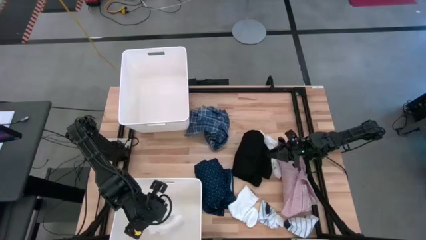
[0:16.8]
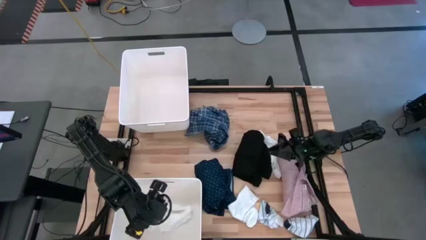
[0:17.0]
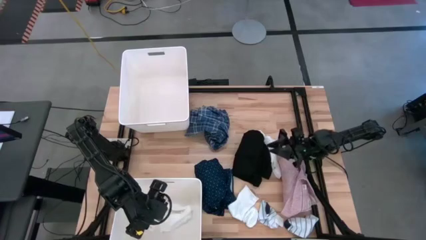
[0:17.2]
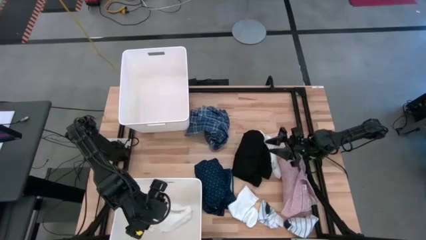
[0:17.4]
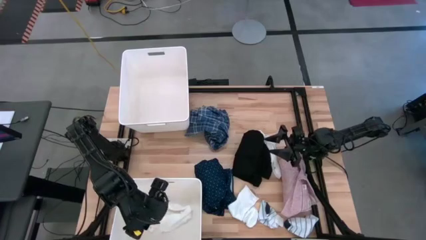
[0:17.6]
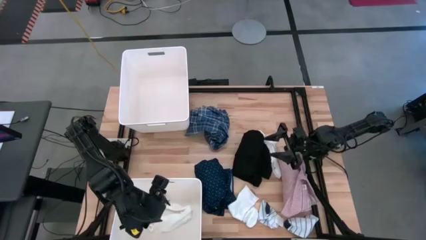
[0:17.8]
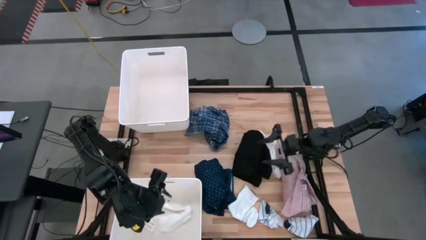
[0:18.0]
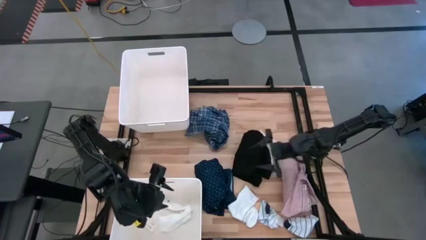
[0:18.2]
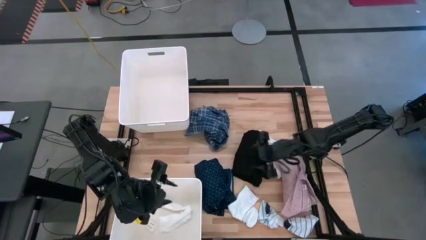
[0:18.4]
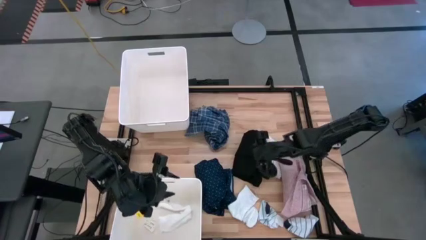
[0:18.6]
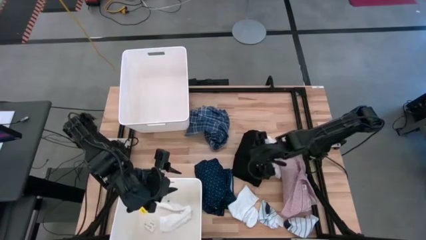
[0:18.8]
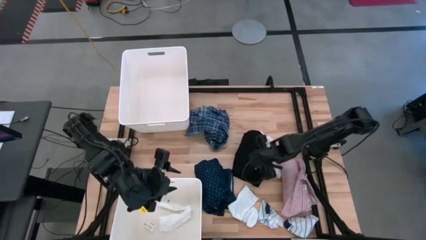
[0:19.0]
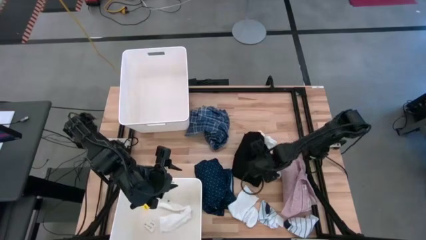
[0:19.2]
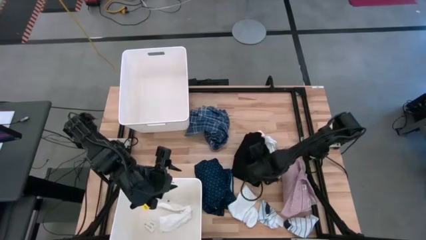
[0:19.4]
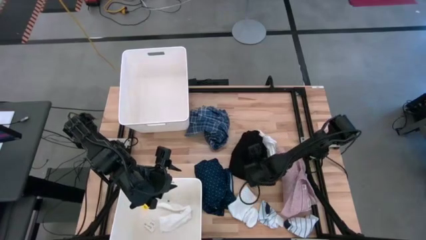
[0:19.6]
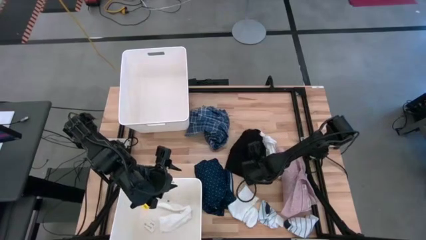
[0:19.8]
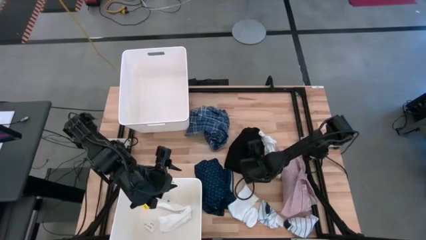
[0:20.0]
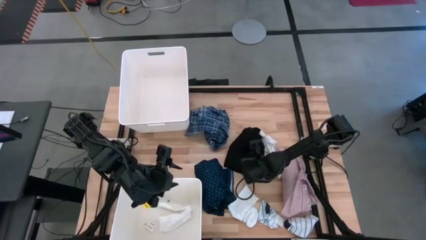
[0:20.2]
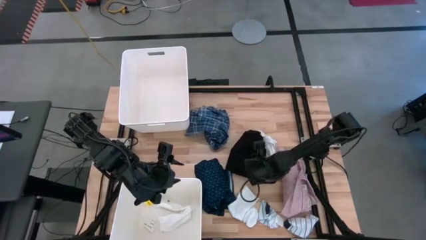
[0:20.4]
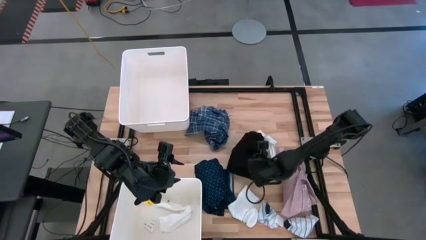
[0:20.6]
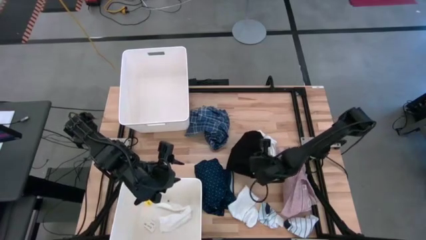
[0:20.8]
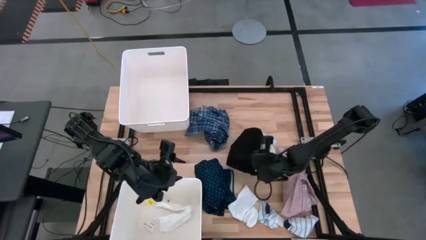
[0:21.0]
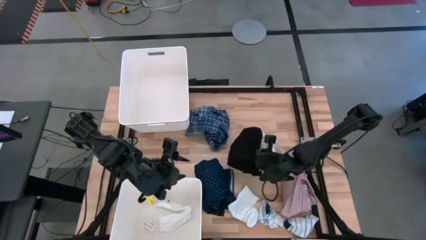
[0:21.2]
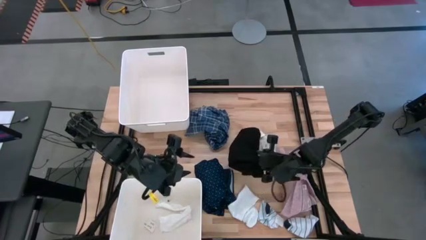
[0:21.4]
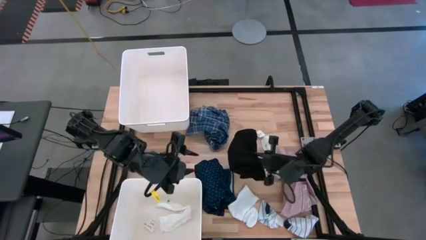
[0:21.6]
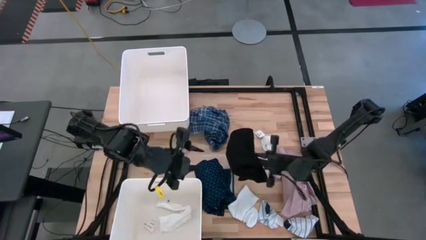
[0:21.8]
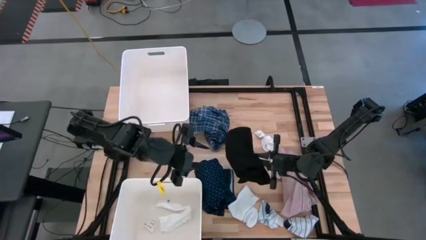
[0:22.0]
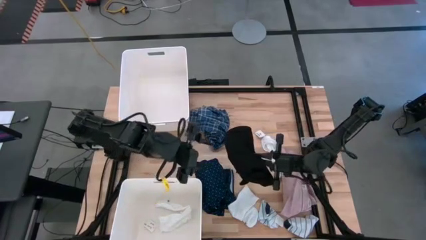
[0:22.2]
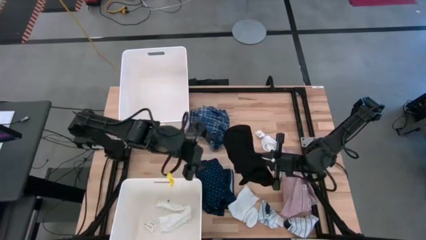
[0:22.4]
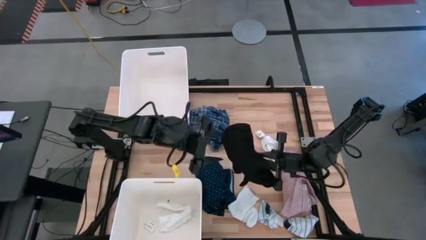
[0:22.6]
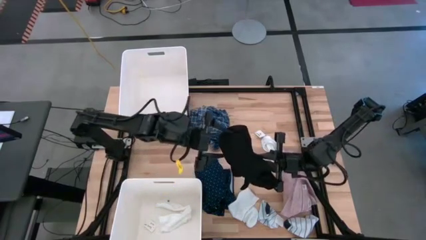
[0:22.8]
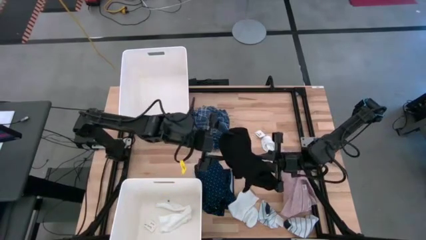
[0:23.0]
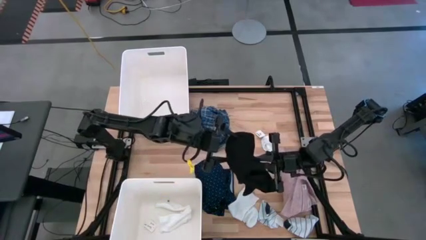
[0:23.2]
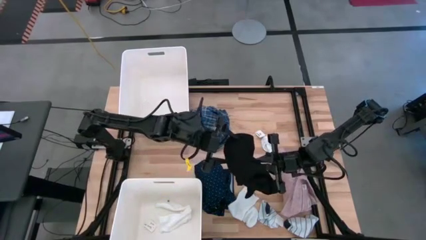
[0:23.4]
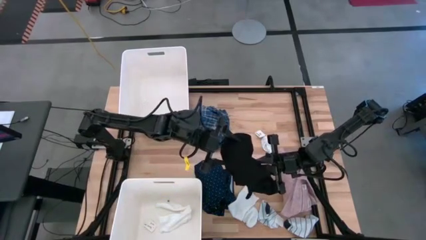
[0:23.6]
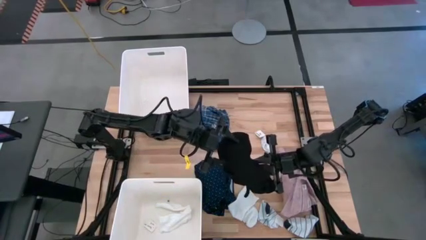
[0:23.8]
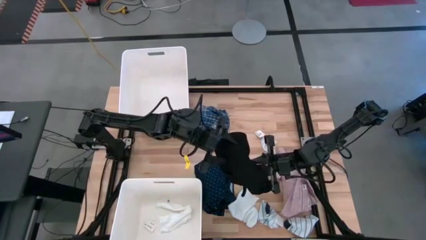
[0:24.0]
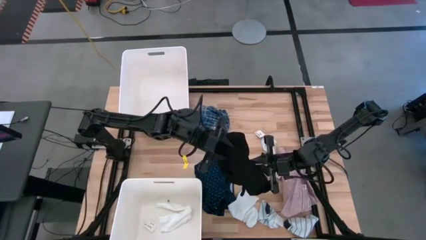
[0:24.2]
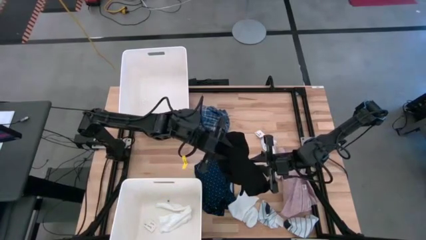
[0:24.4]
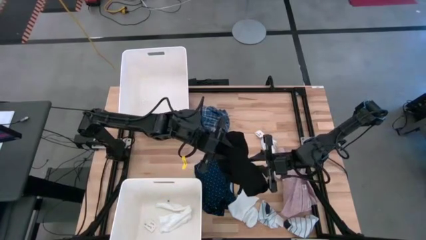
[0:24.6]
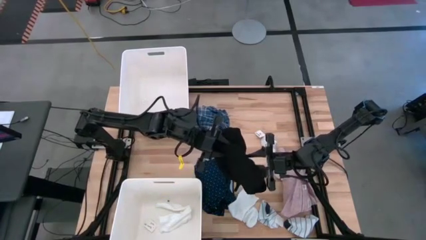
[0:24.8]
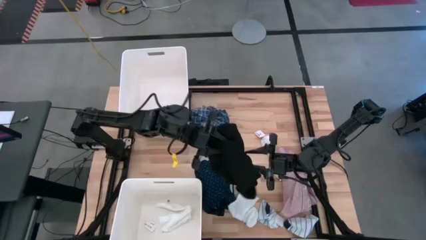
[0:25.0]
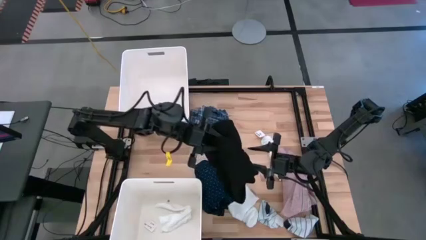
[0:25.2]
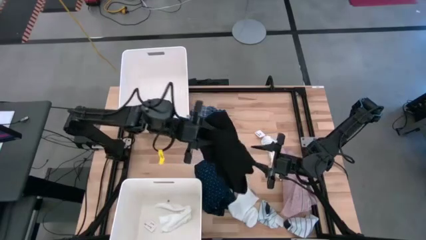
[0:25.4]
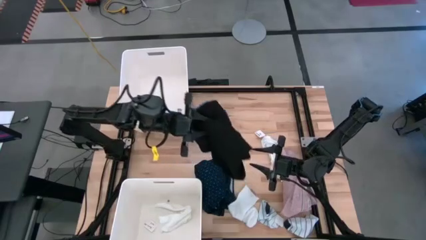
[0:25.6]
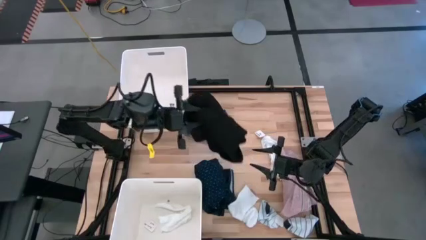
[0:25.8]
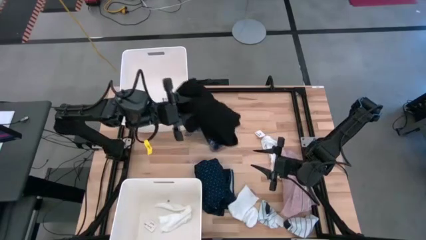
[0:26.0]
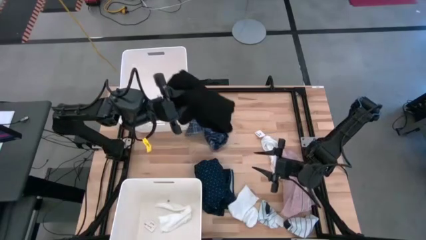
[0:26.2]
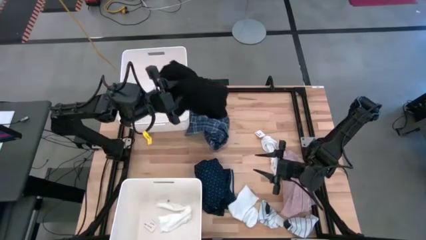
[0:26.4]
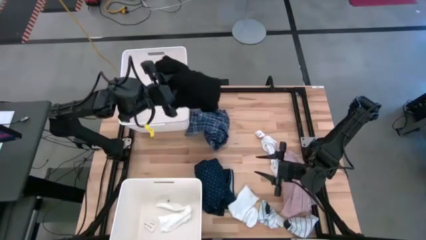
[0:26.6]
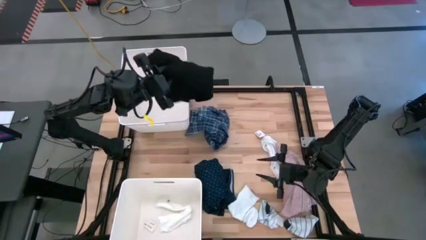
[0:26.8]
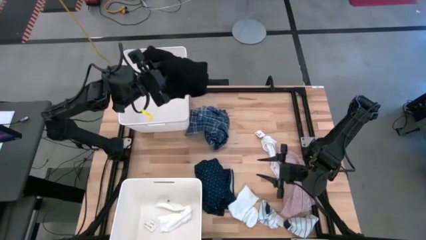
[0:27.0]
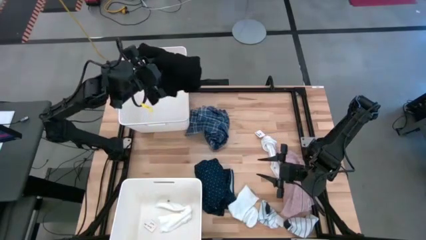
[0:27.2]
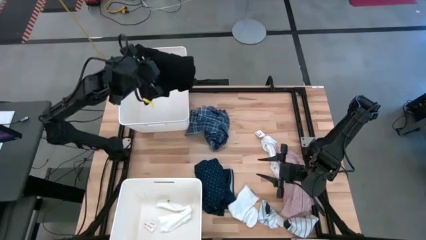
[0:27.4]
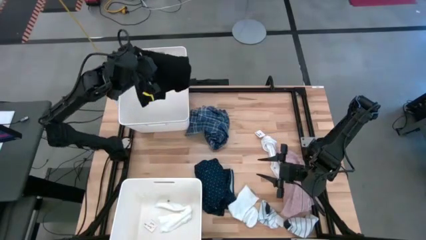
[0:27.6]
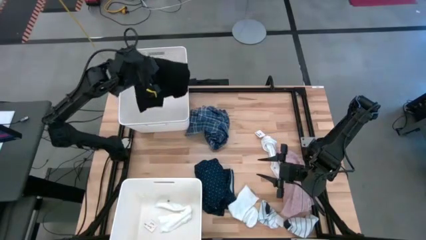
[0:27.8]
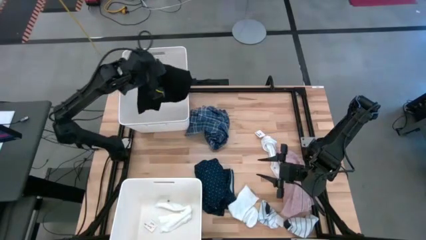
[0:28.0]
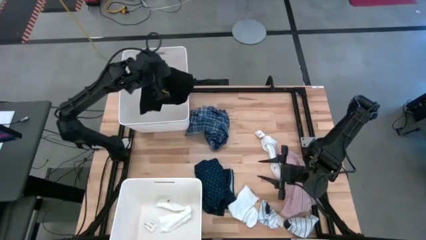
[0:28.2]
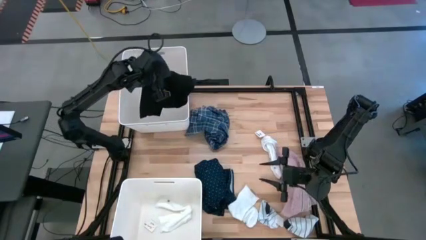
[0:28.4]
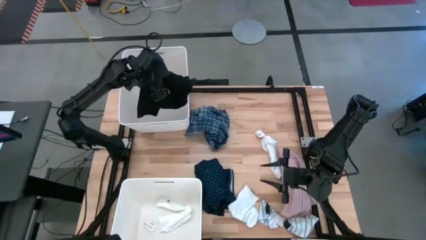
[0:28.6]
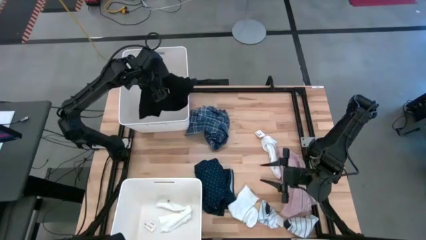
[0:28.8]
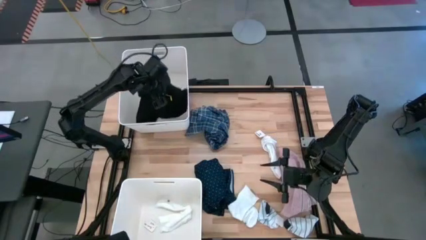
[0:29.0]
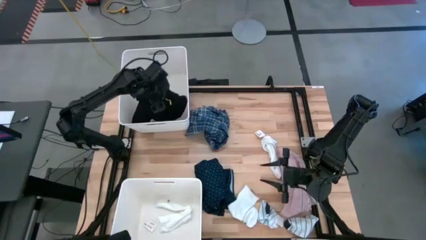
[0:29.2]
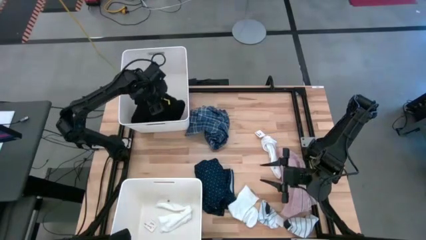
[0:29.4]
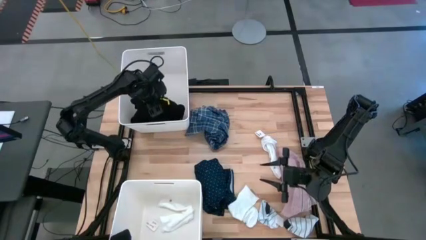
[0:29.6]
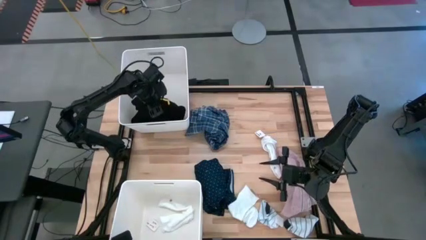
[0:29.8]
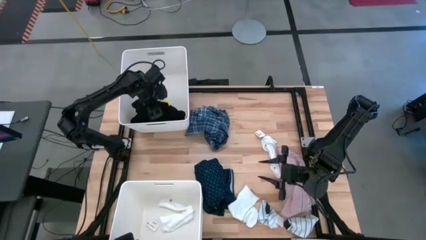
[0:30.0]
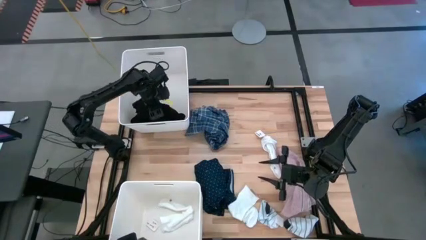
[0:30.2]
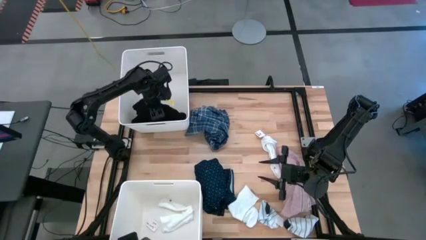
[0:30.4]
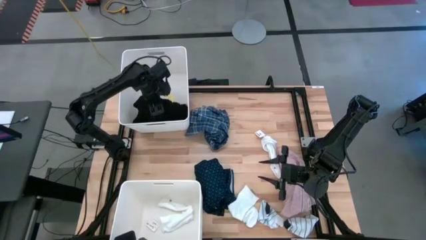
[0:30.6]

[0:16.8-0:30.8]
Task: Sort clothes
Put the black jacket into the top white bin
